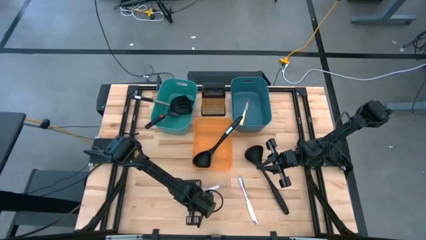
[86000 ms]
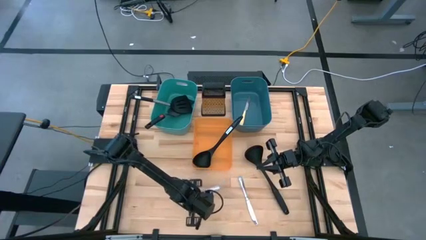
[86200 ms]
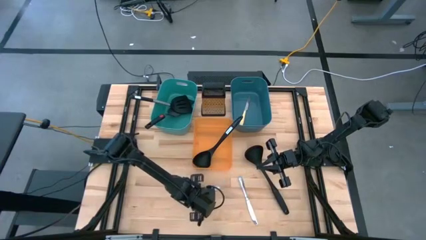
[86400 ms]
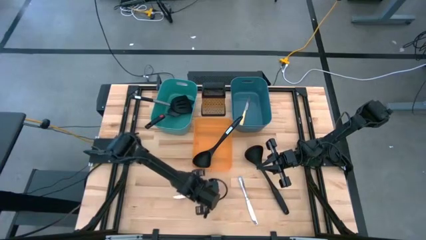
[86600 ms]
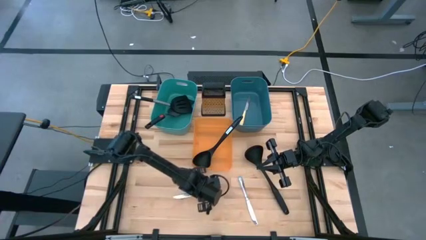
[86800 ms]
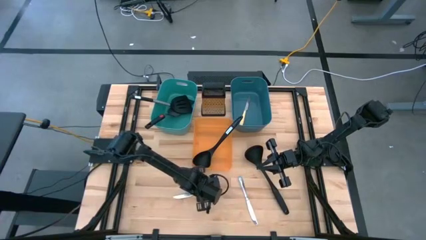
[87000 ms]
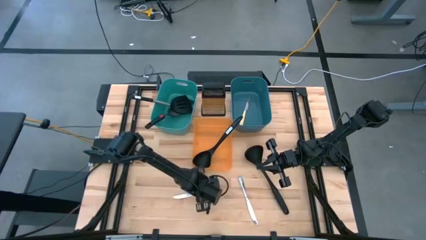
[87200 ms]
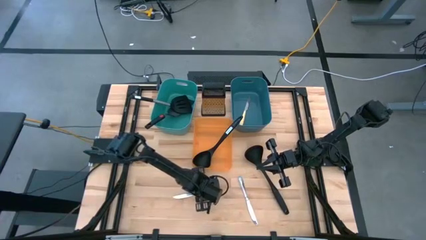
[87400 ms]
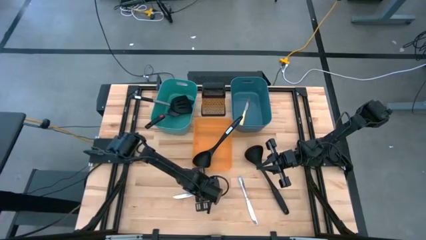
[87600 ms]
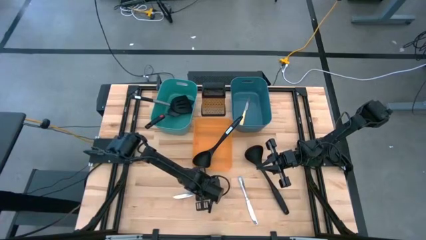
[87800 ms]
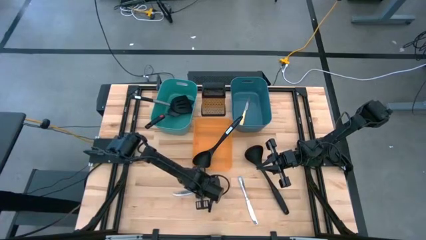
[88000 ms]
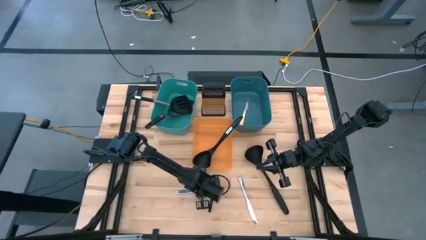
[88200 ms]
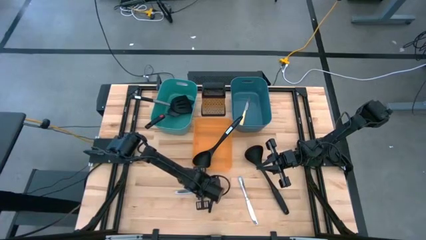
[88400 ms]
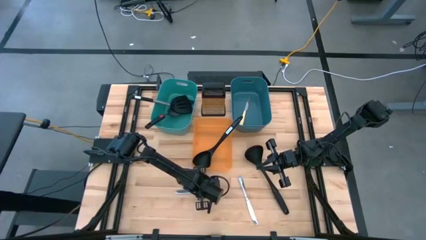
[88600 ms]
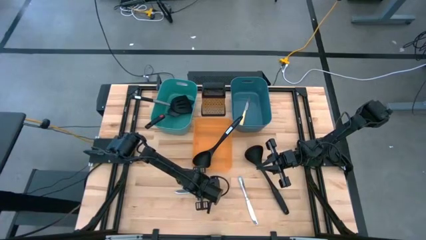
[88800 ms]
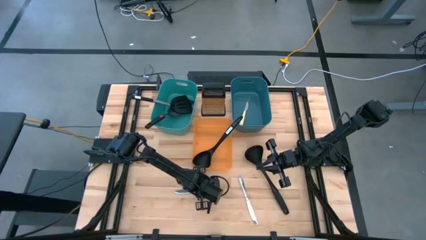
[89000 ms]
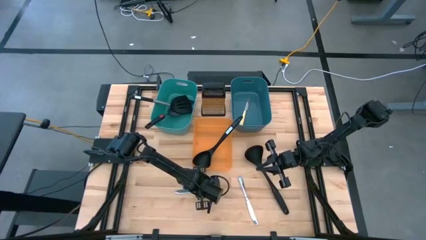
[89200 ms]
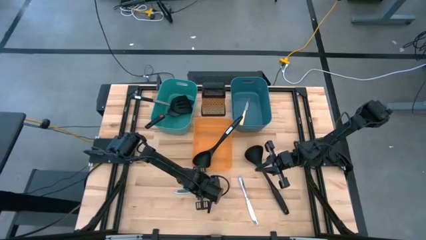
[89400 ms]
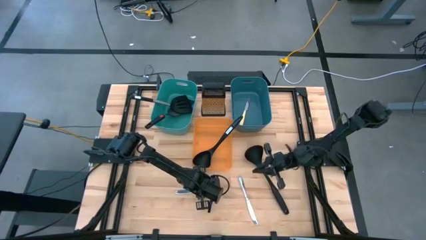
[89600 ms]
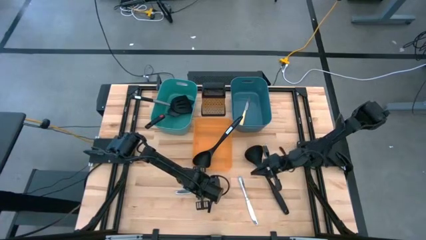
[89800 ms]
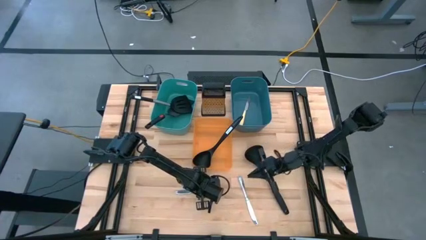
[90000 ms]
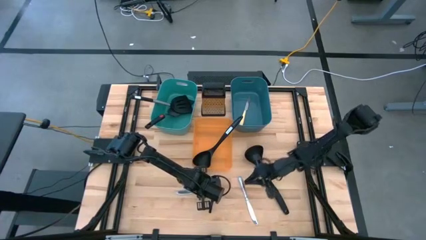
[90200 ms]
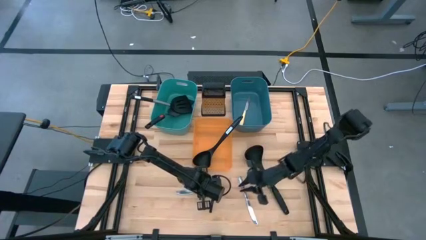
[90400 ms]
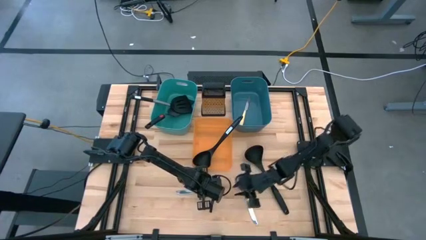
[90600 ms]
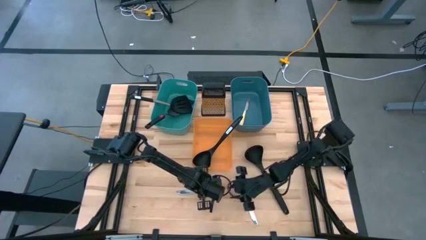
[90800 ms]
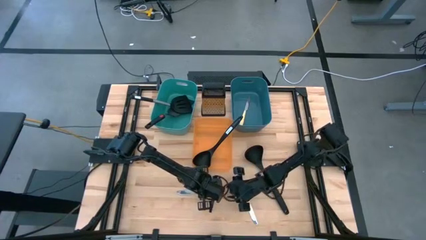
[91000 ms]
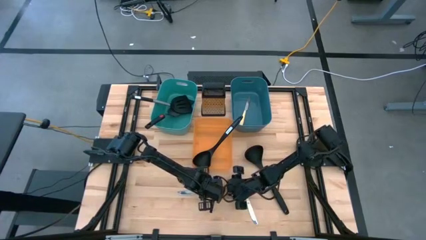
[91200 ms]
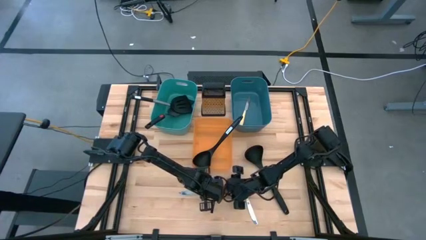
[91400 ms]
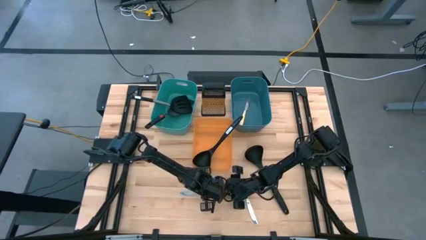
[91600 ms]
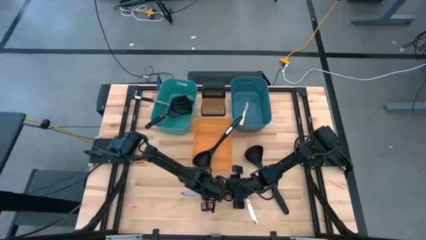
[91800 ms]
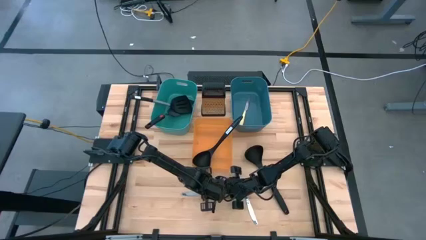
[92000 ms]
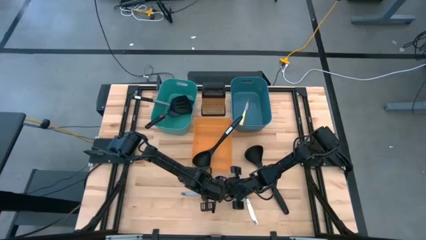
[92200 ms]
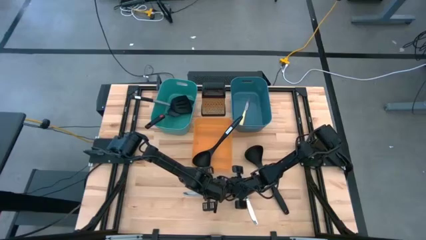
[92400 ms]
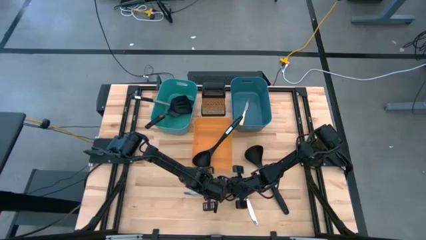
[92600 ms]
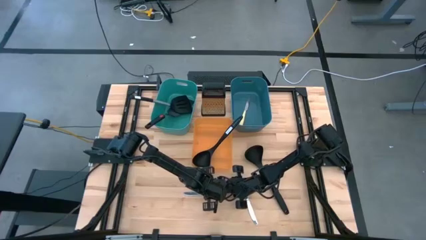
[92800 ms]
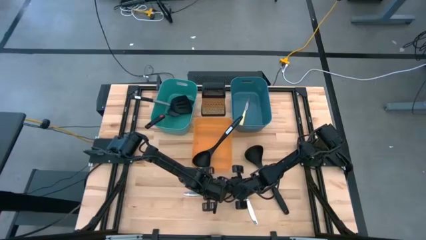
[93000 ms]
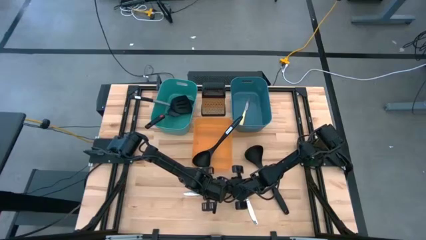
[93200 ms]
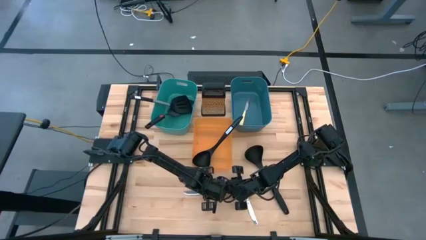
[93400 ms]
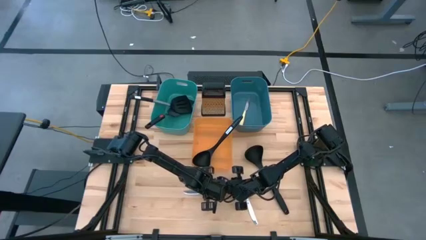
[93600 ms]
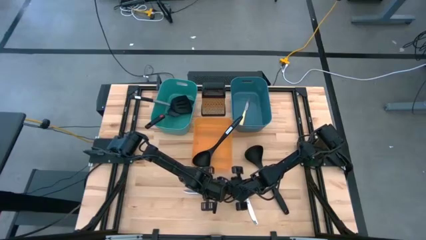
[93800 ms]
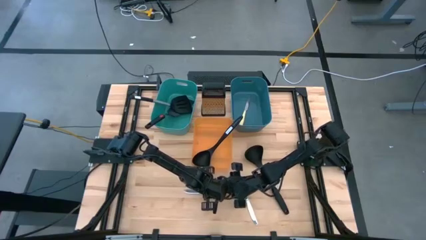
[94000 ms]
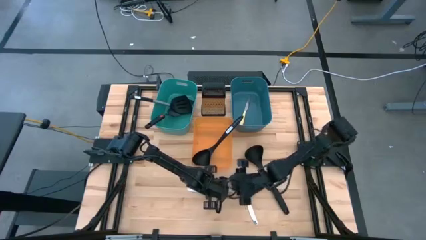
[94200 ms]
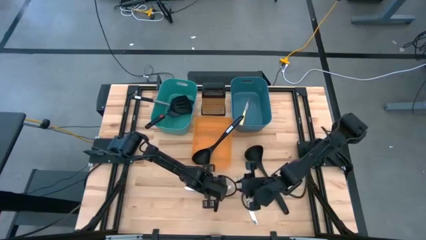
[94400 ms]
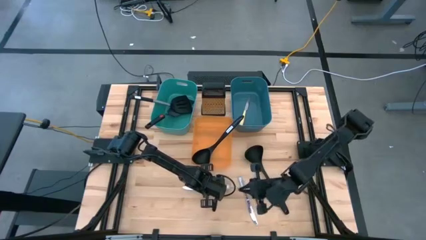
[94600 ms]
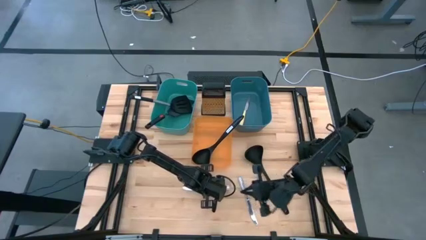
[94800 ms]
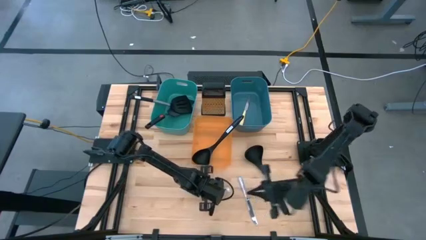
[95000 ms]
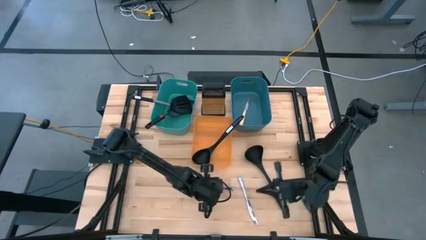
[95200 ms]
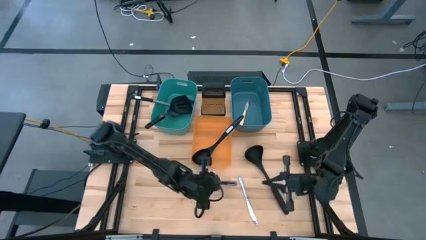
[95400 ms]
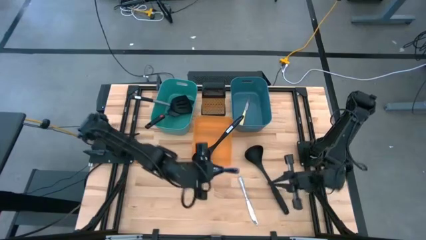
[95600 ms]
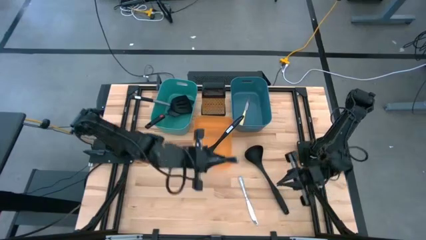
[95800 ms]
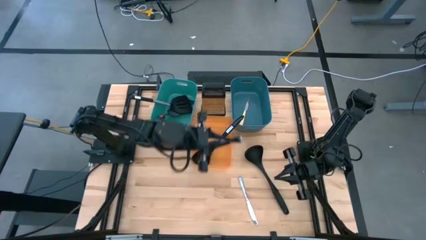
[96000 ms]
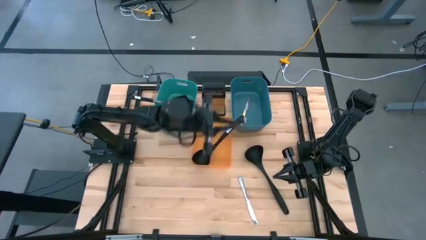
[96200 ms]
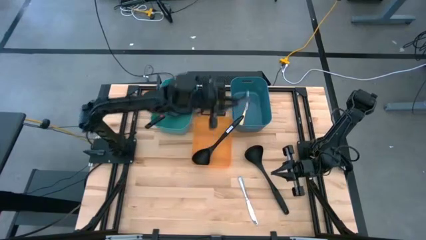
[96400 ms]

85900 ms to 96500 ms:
Task: Pick & Place Kitchen Items
Put the left silver knife into the blue bin

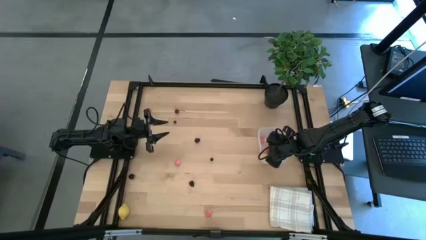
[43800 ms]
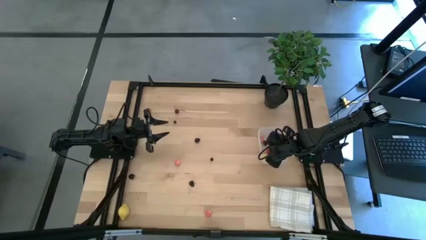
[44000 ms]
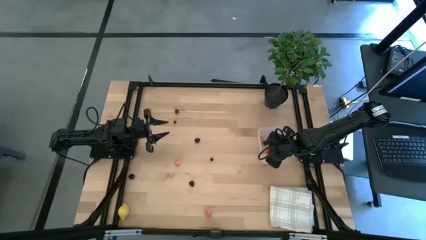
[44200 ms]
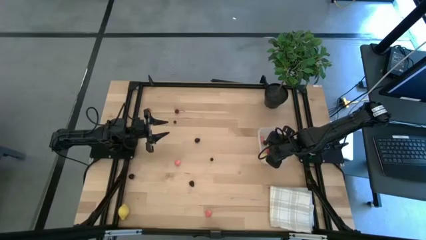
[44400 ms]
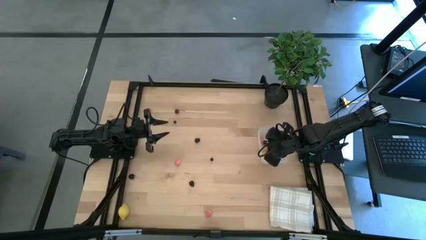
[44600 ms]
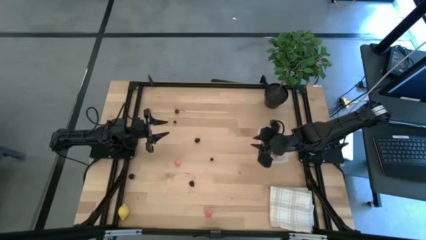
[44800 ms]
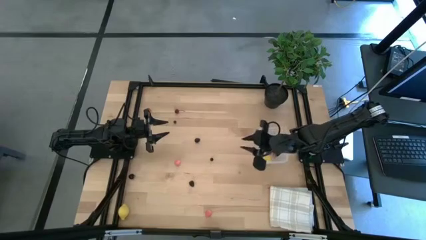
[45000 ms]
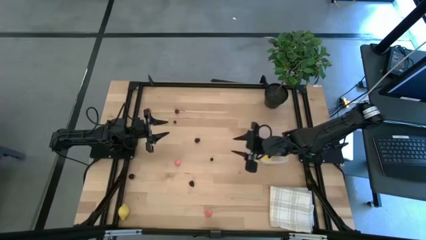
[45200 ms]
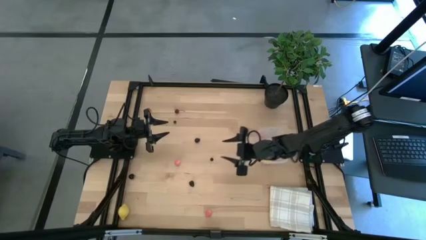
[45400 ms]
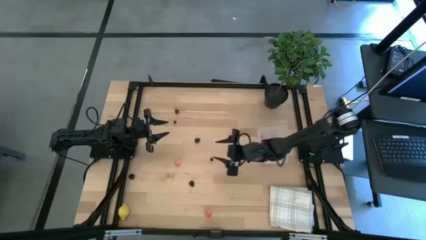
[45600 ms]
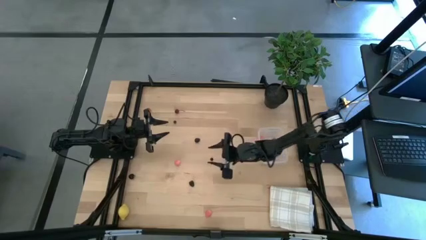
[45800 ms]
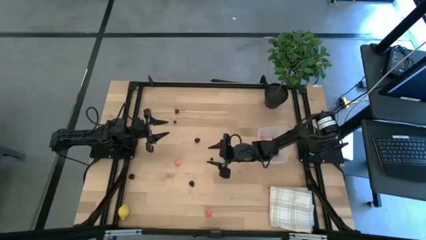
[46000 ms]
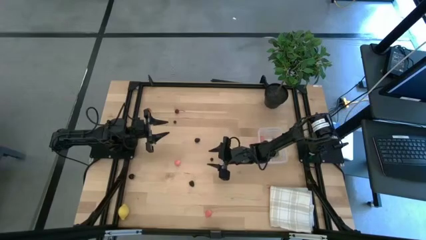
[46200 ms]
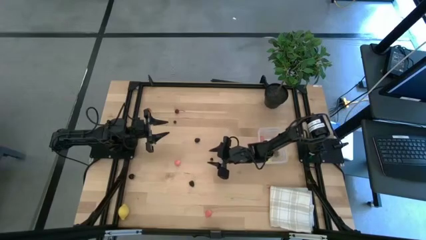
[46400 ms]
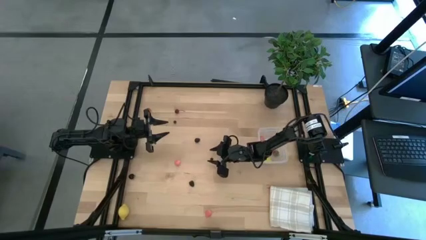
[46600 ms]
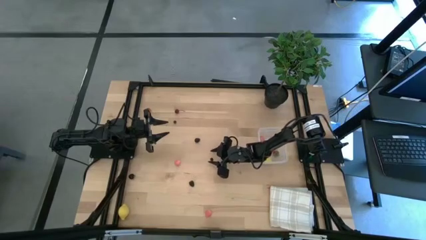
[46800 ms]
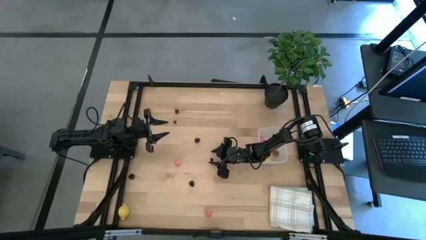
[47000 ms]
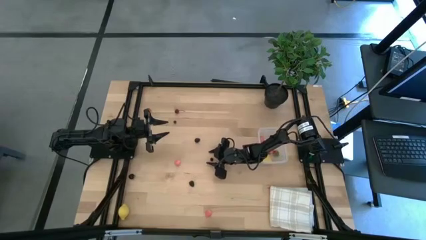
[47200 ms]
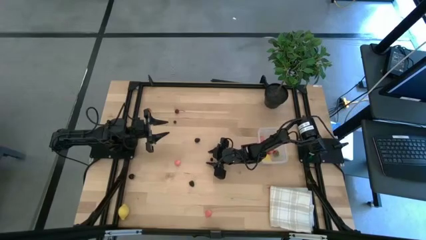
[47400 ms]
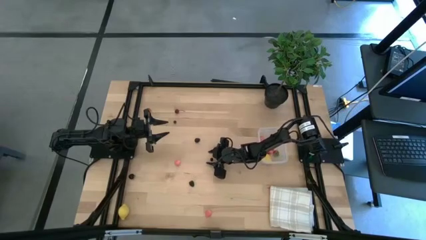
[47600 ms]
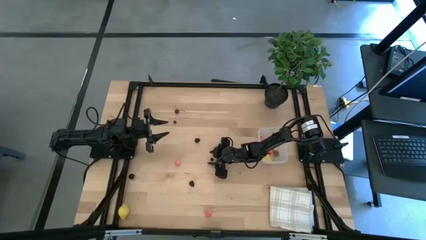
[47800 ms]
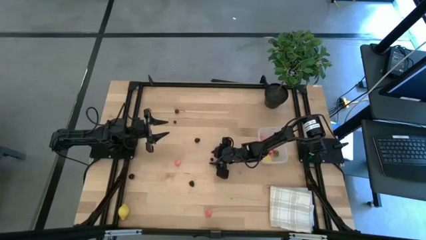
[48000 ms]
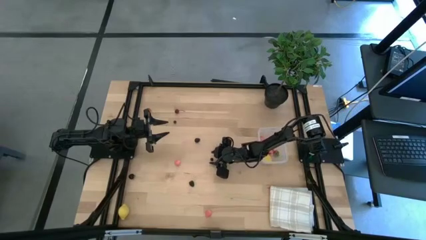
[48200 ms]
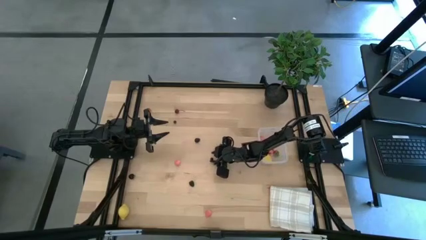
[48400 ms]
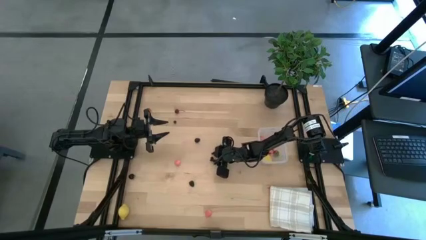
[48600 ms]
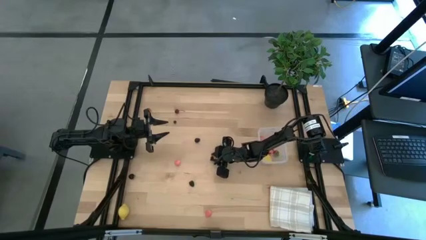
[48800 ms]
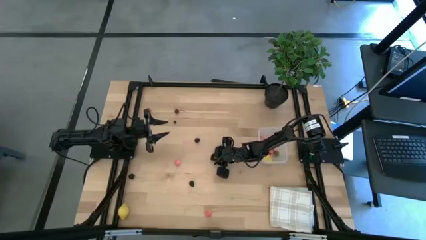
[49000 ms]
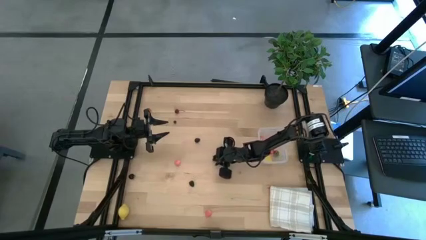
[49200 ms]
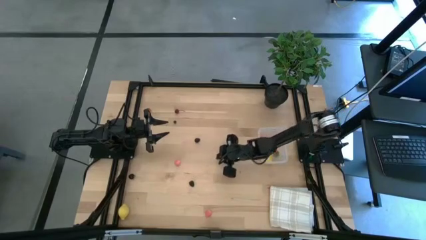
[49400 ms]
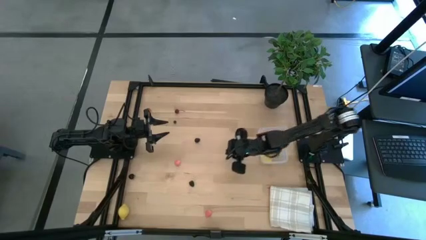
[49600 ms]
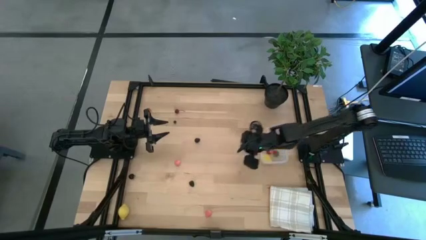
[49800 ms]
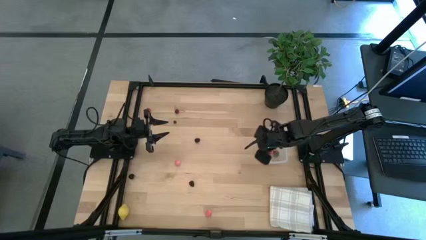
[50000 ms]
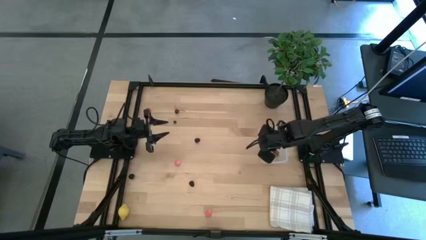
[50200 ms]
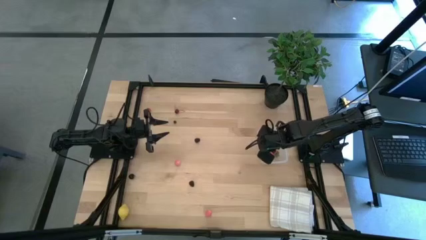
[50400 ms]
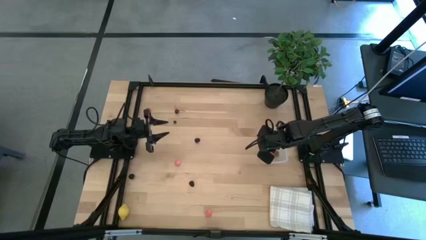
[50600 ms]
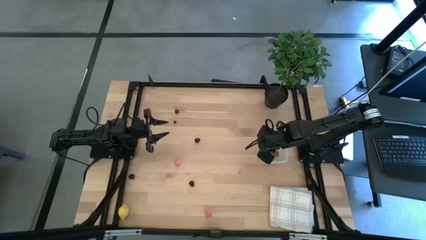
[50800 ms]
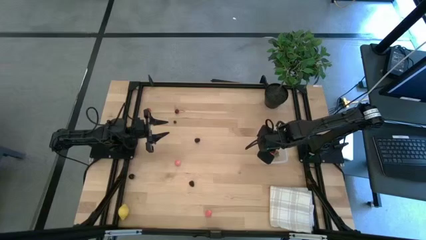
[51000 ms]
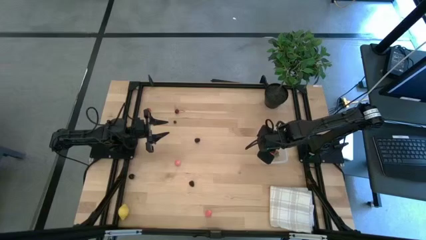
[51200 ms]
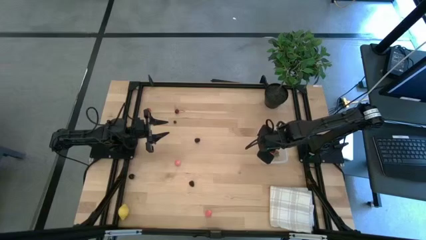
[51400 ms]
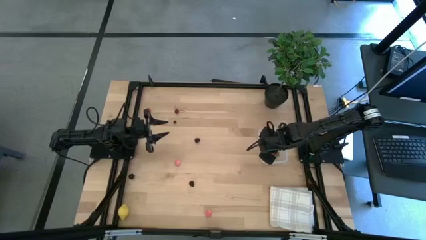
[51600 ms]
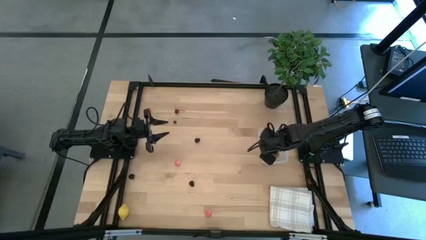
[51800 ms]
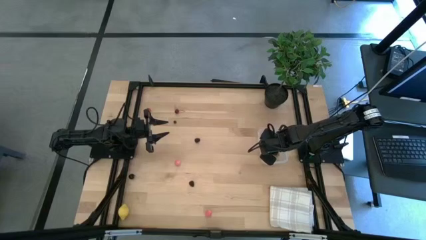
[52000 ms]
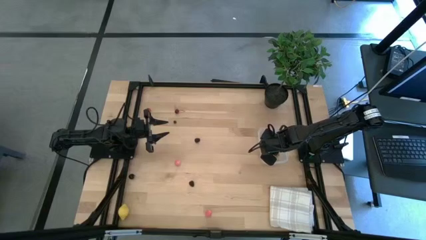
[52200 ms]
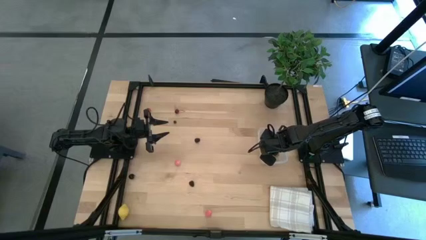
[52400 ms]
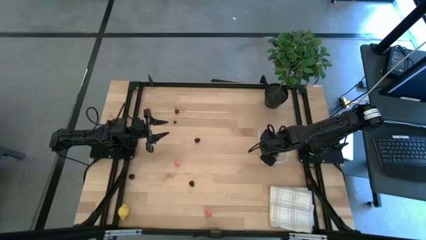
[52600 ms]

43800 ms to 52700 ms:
Task: Pick and placing Produce into tupperware
Put the bottom blueberry into the transparent bin
